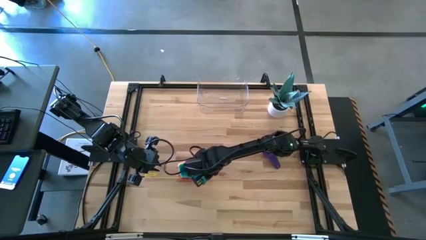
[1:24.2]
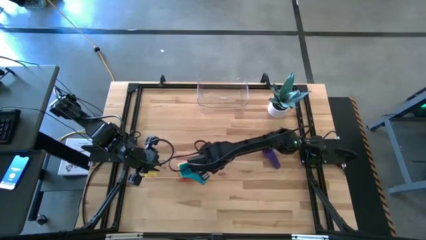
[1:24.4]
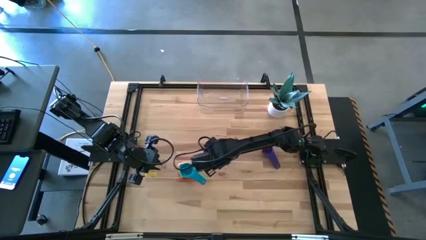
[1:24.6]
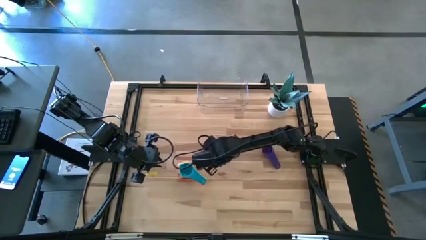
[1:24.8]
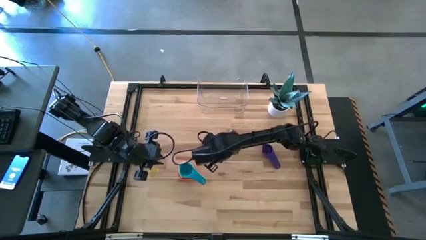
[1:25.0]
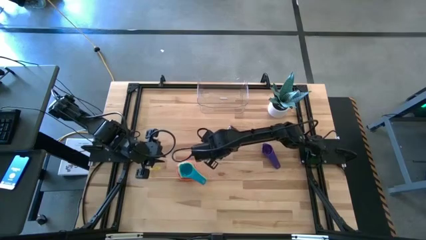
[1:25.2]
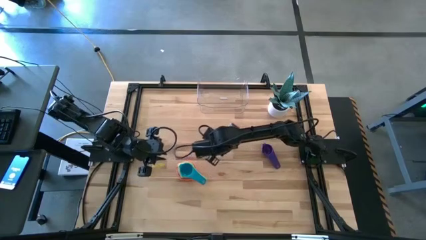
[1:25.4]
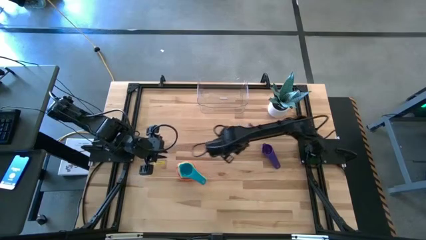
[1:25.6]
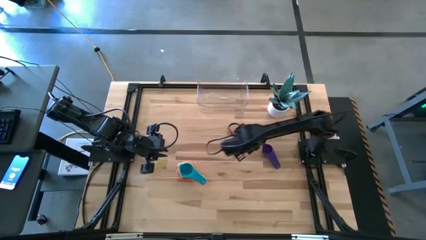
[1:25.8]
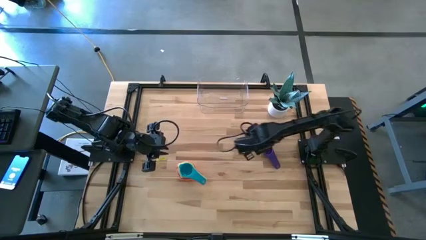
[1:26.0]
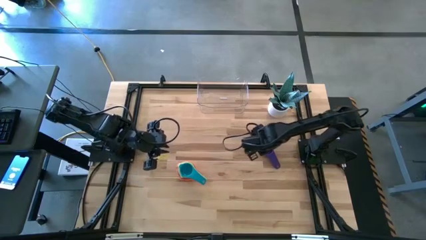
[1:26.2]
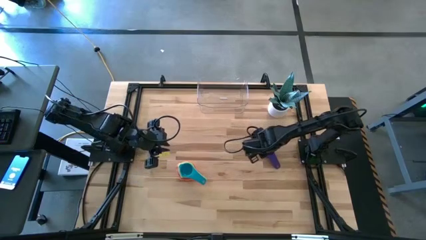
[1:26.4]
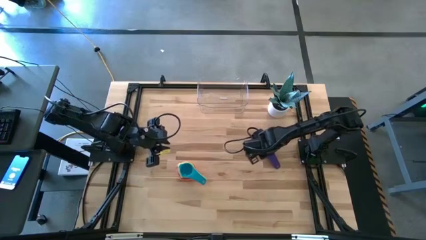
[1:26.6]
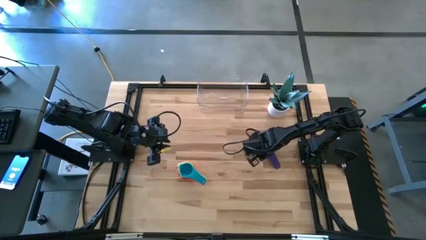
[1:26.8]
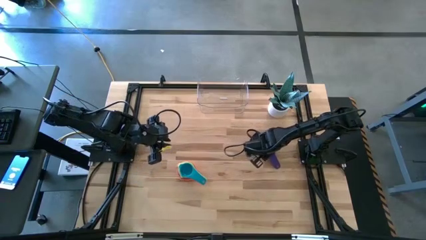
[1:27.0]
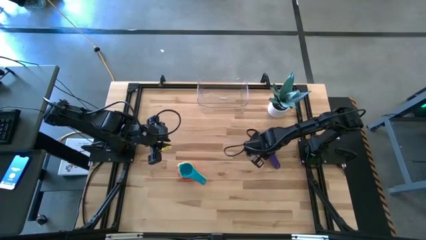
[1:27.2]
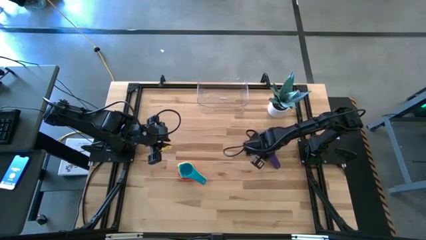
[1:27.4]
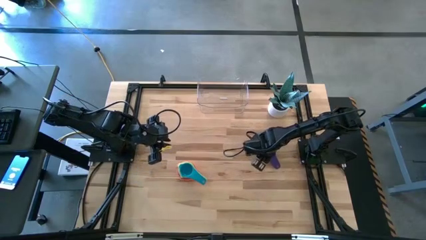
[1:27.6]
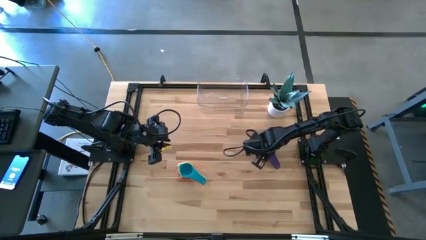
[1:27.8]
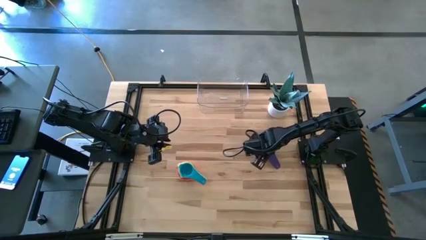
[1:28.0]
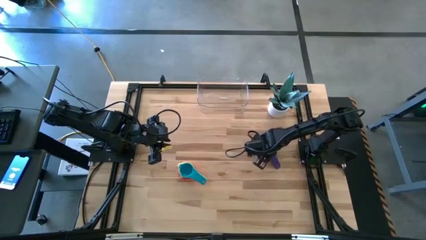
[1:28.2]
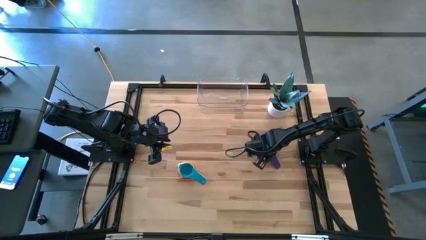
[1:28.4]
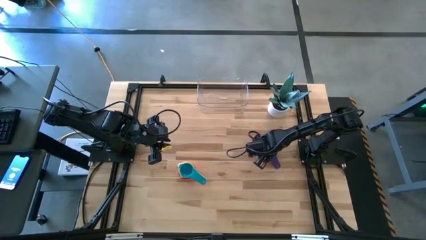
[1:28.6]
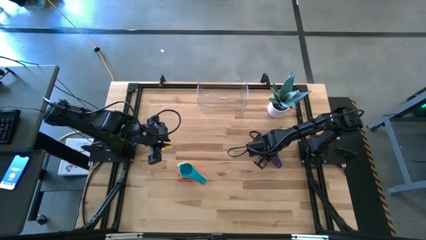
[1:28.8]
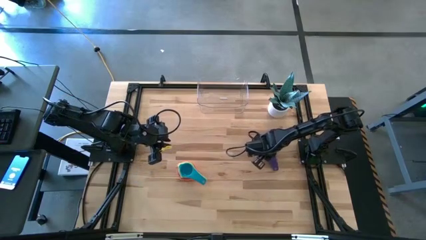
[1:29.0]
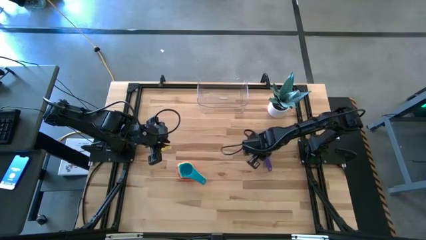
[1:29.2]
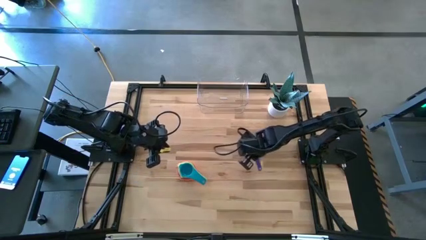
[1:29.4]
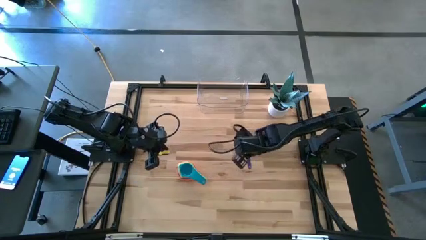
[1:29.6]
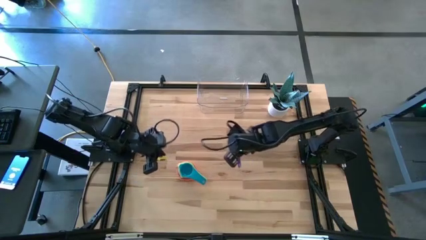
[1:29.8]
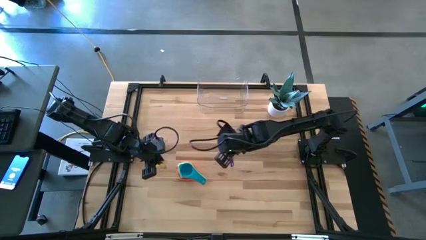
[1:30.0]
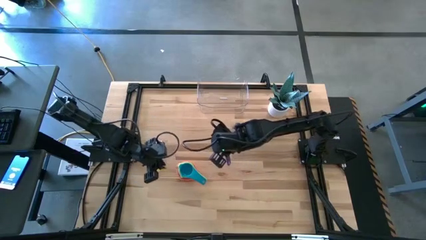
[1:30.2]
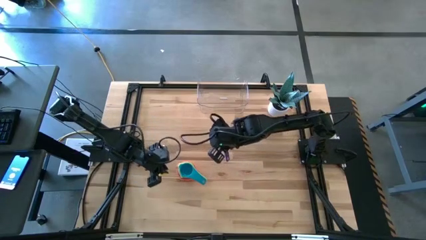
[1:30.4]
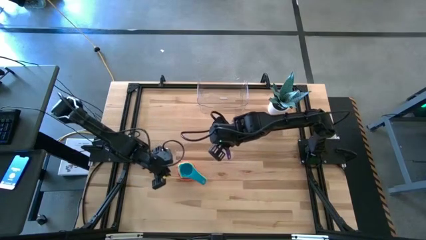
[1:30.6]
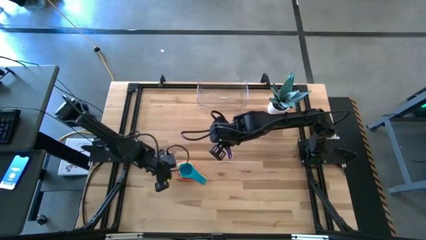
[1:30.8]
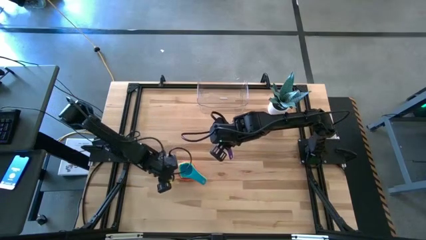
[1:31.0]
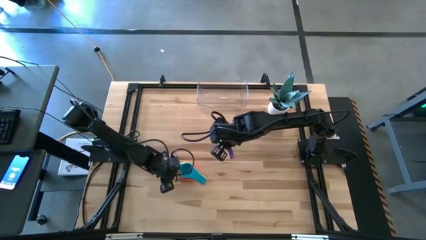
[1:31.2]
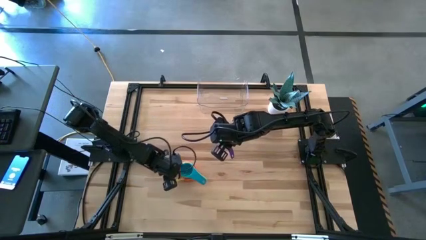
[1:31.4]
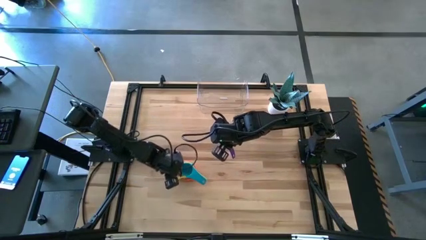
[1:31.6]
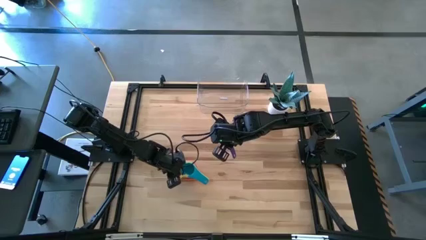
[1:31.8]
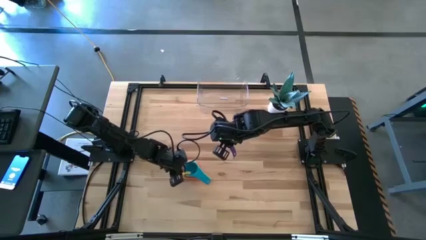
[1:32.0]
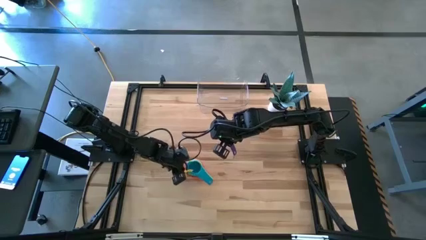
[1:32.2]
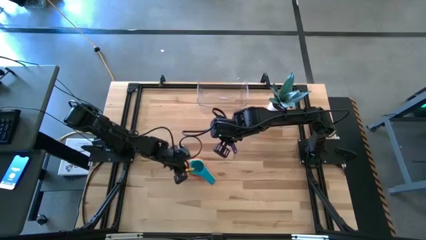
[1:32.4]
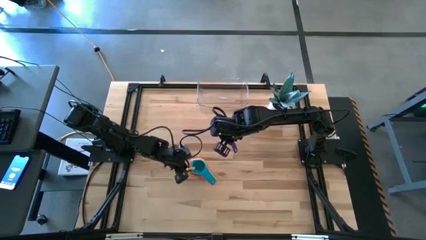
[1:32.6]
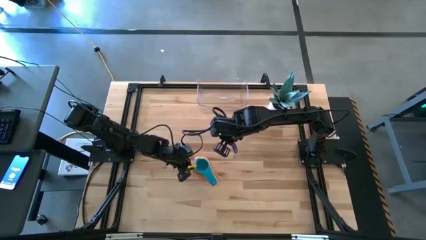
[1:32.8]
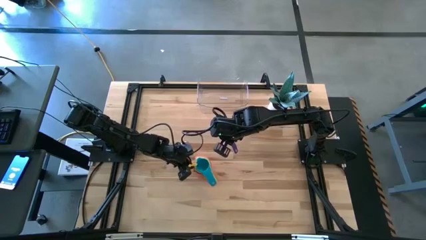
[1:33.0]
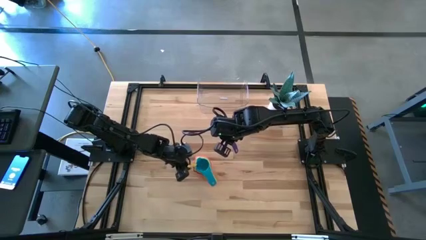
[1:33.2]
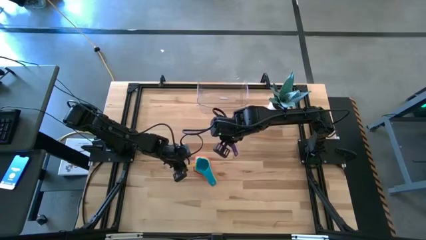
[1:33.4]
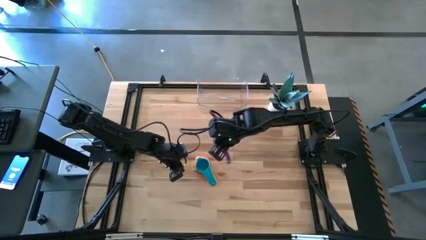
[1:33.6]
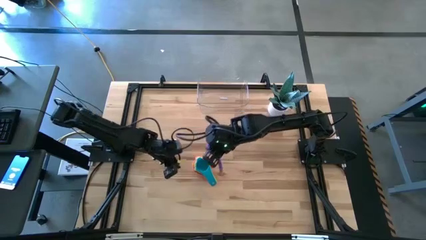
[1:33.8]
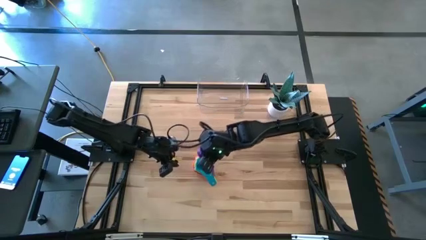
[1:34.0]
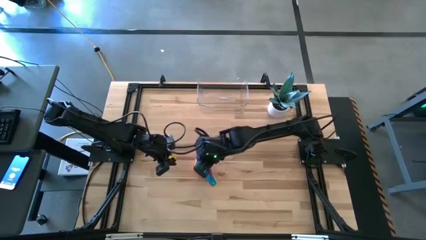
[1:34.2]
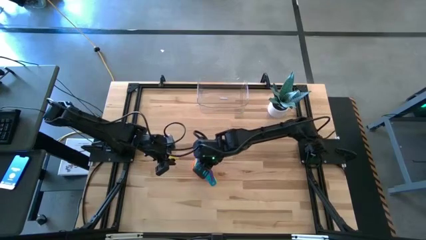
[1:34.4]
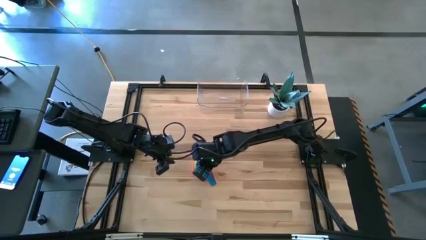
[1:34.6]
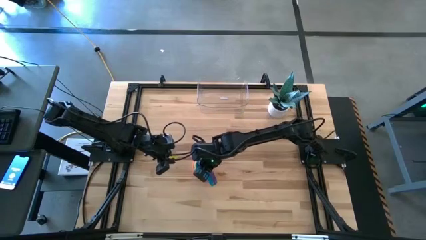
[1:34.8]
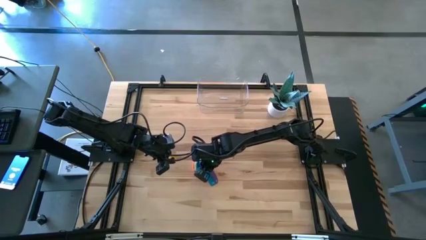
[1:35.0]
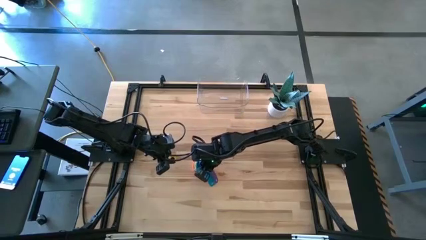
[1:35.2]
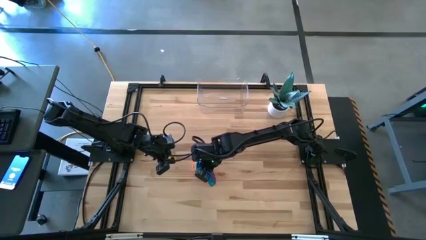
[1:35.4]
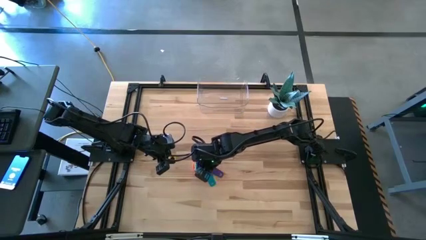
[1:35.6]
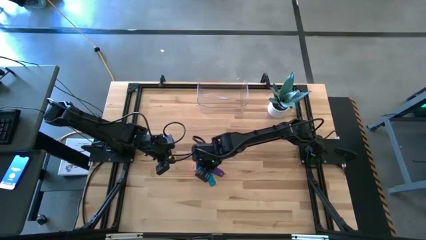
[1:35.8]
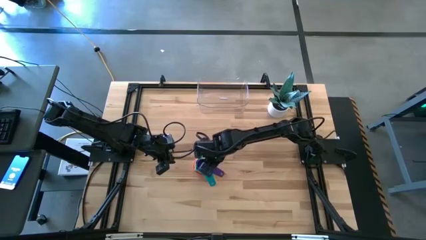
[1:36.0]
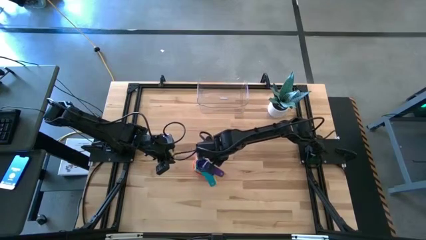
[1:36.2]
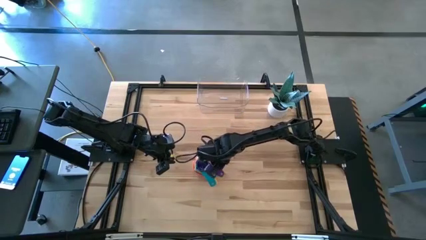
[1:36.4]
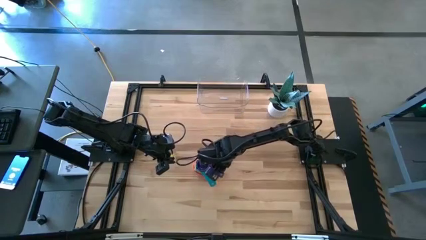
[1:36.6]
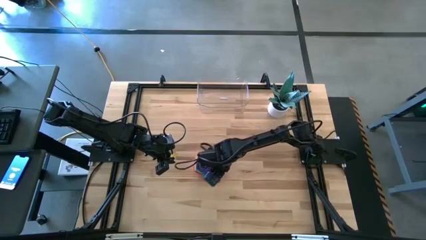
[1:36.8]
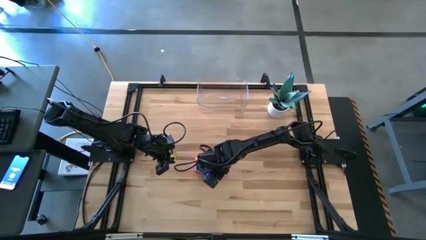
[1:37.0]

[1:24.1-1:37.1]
Task: Nest measuring cups in basket
Stack the purple measuring cup on top of the light blue measuring cup

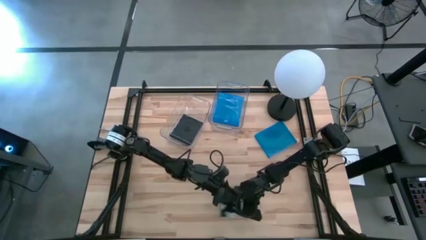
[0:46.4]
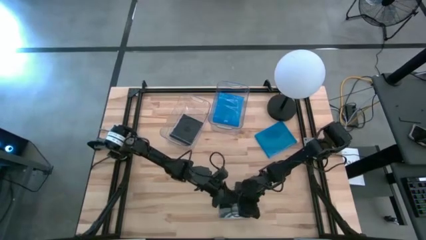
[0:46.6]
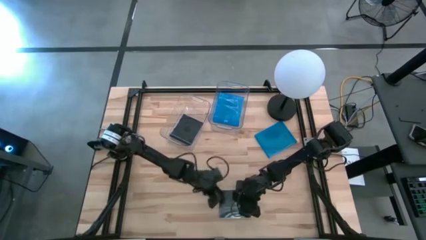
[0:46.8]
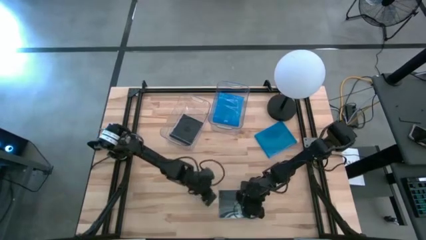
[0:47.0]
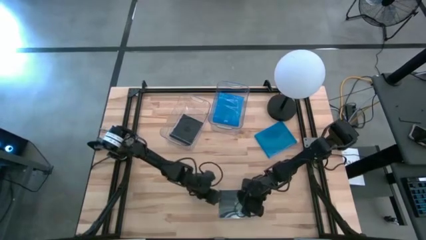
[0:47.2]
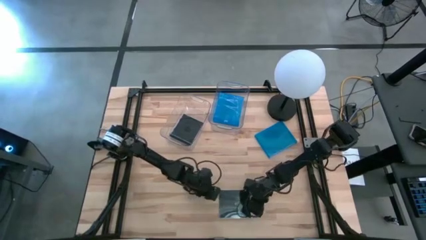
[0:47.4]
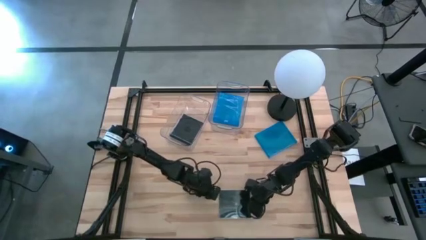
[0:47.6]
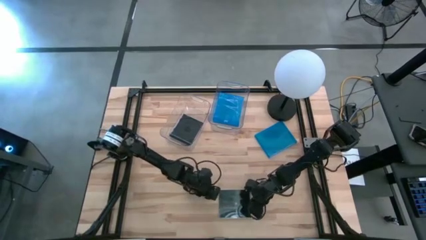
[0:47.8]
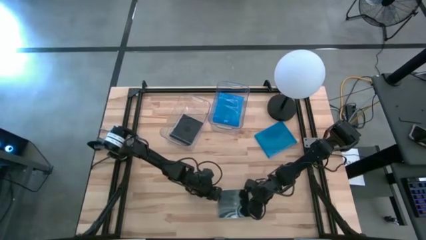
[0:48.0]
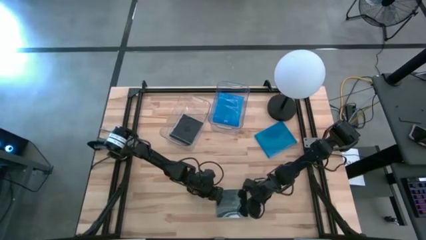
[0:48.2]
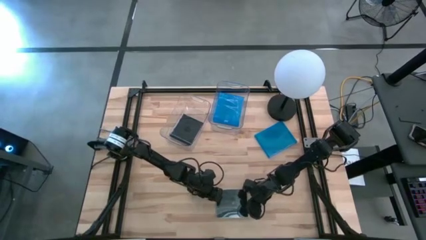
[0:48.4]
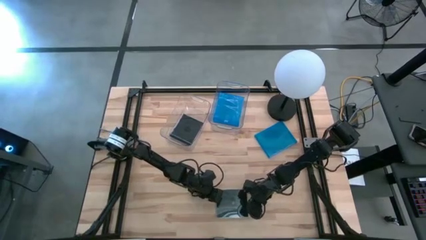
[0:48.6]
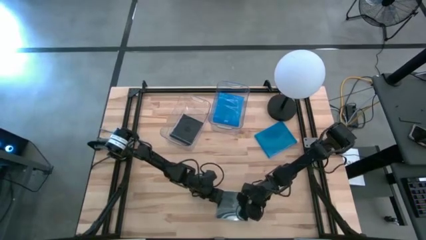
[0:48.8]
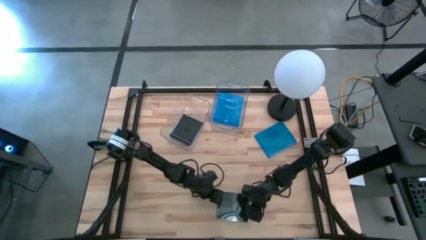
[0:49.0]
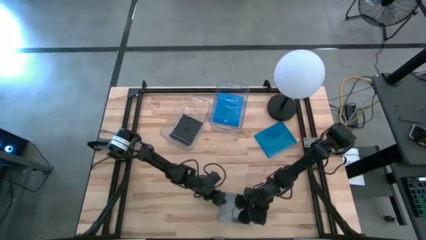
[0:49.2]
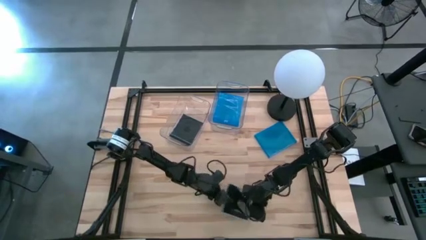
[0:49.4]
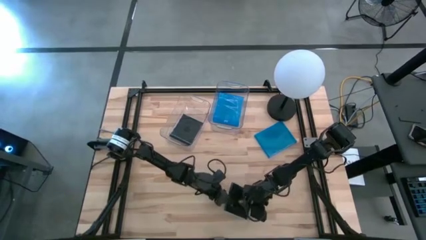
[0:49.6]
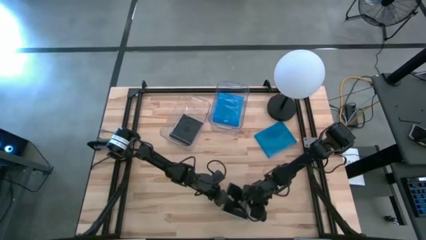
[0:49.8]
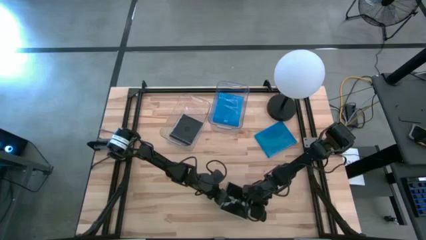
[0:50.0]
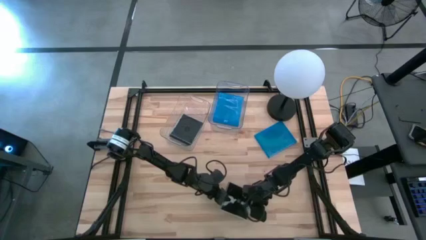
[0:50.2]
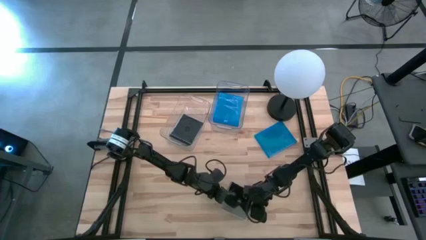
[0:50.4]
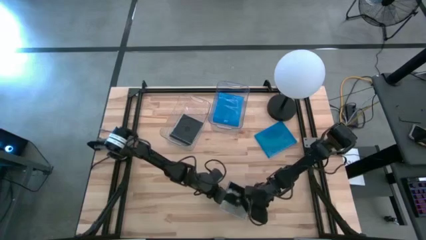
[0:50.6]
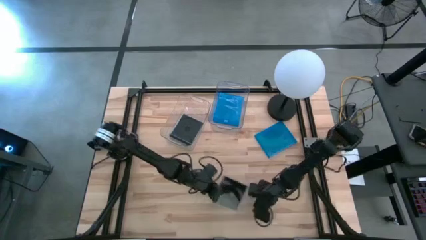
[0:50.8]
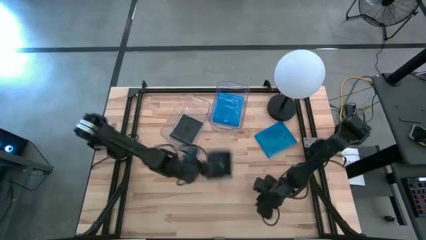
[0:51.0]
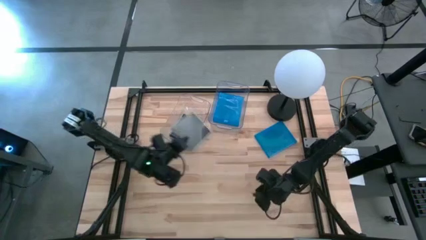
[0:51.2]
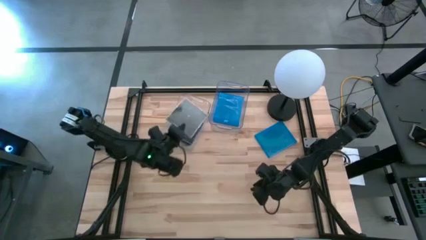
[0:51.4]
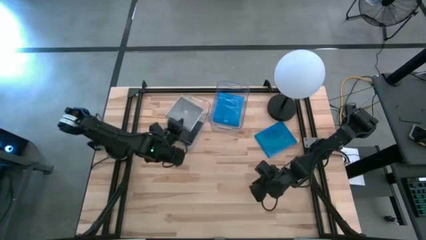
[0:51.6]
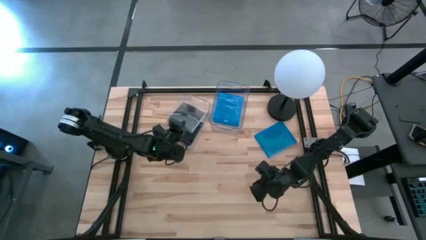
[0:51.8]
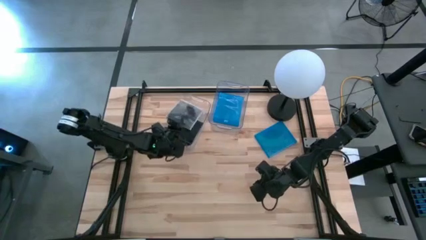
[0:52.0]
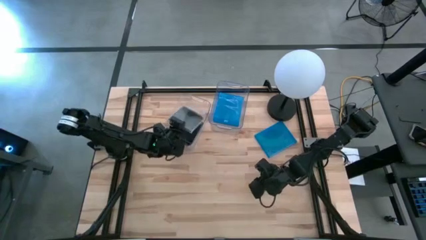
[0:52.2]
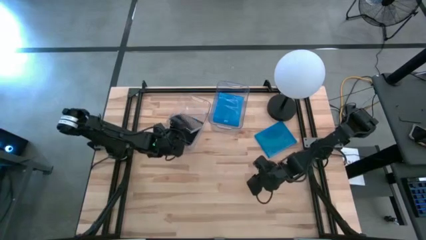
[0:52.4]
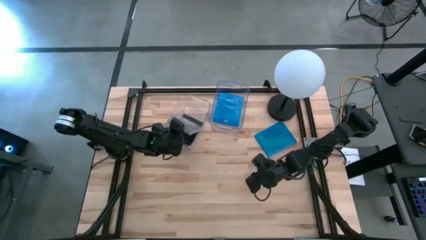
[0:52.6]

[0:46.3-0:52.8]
Task: Pick & place jewel cases by type
Put the black cd case into the left transparent bin
